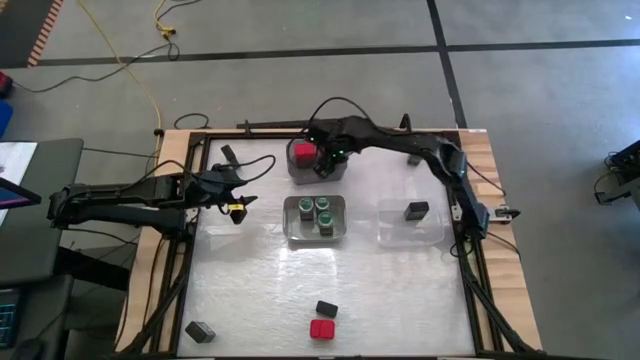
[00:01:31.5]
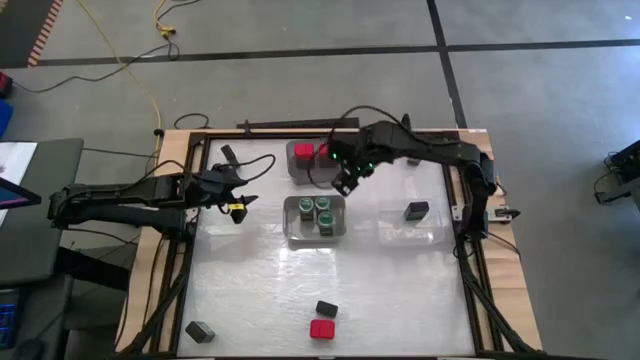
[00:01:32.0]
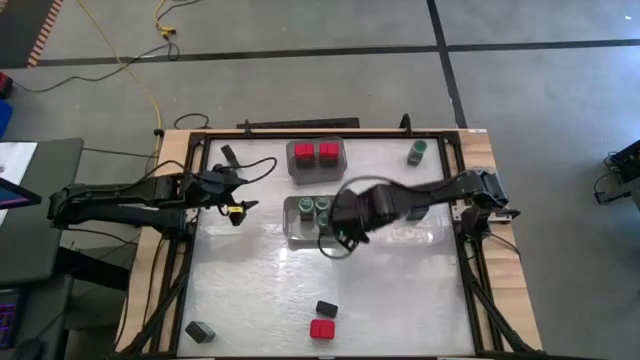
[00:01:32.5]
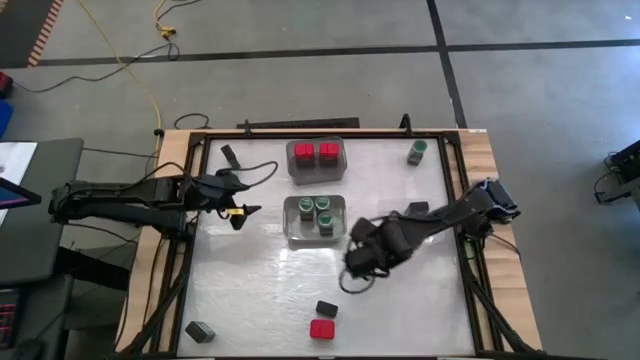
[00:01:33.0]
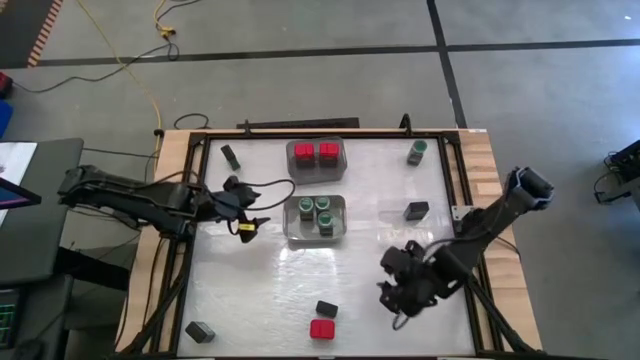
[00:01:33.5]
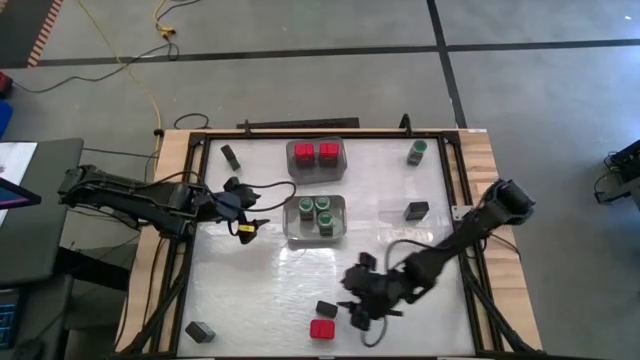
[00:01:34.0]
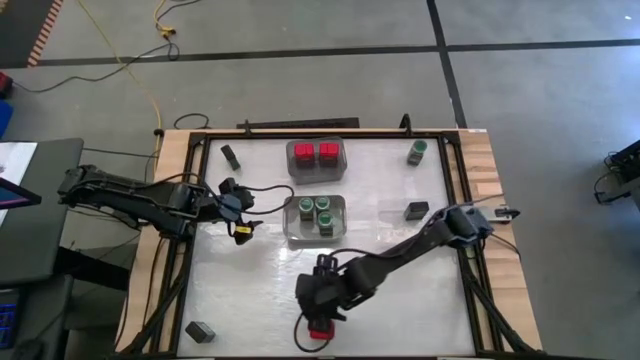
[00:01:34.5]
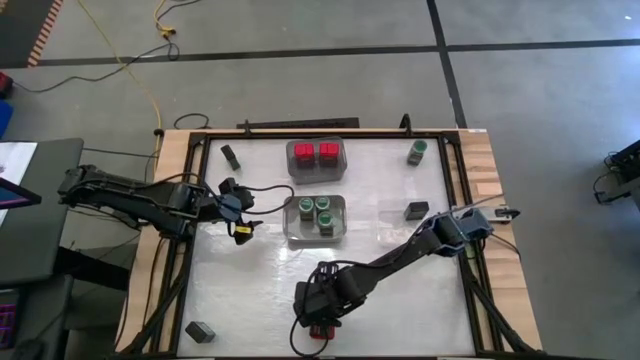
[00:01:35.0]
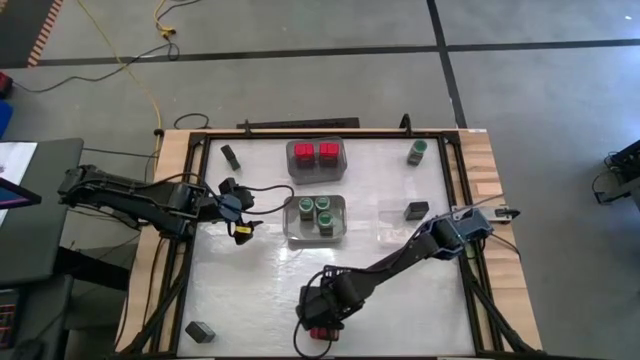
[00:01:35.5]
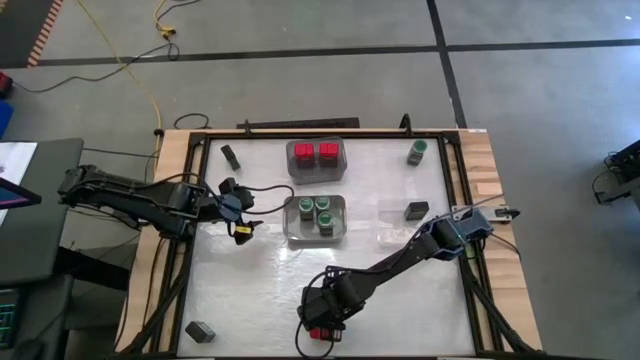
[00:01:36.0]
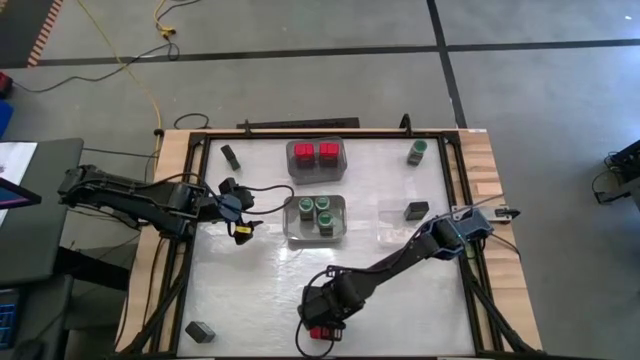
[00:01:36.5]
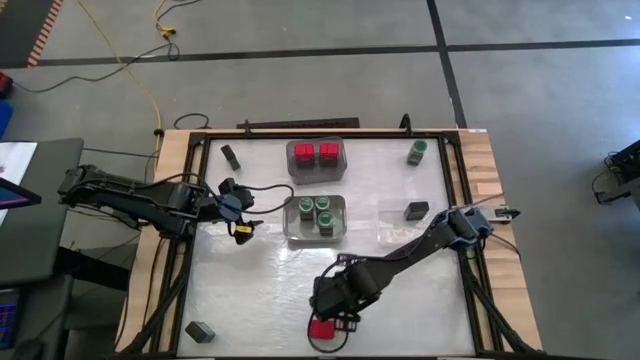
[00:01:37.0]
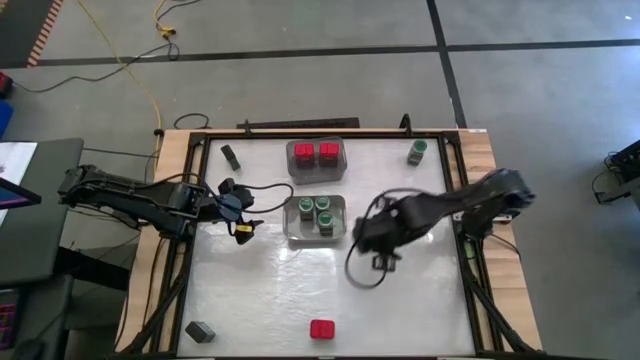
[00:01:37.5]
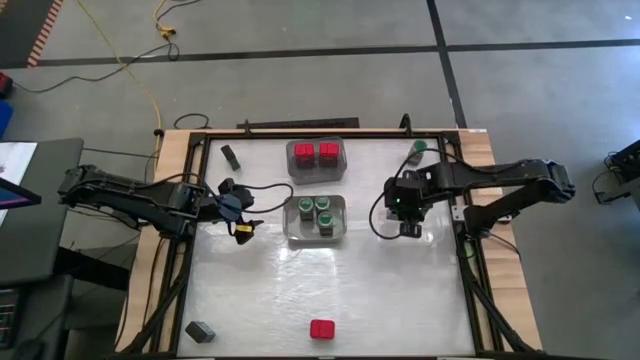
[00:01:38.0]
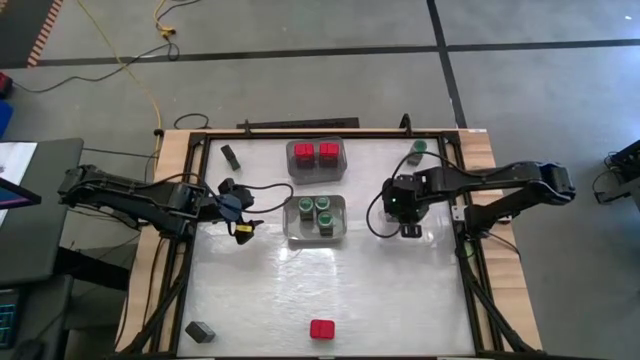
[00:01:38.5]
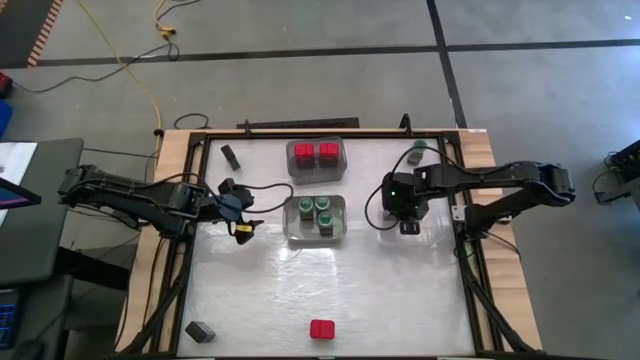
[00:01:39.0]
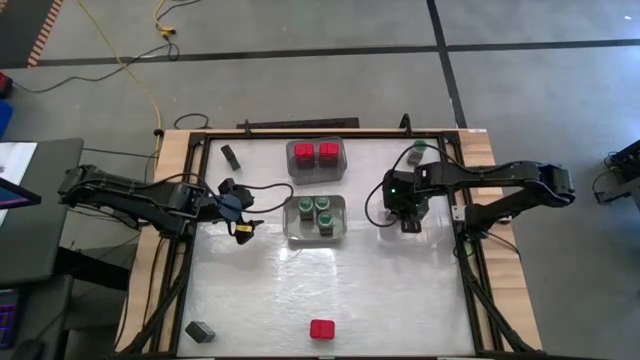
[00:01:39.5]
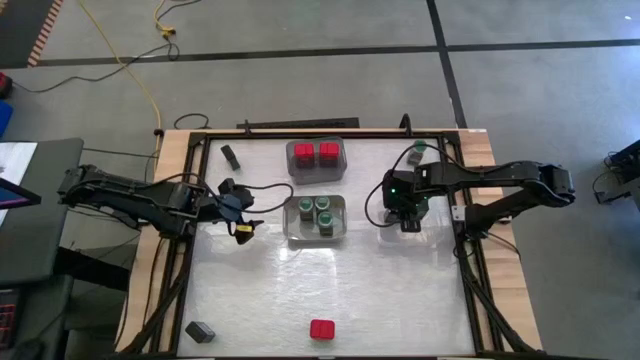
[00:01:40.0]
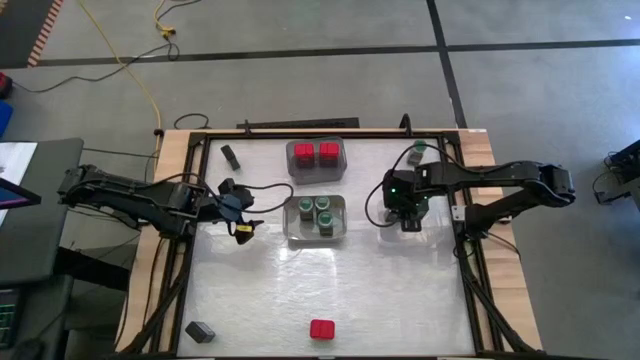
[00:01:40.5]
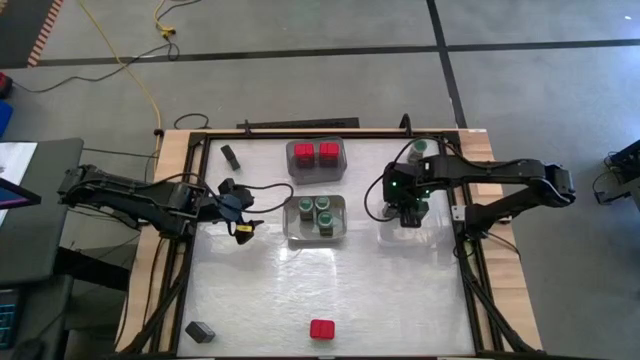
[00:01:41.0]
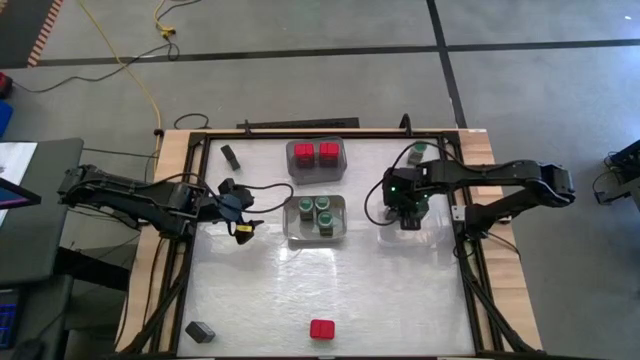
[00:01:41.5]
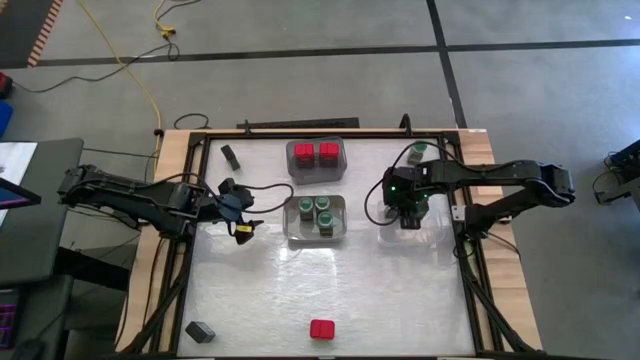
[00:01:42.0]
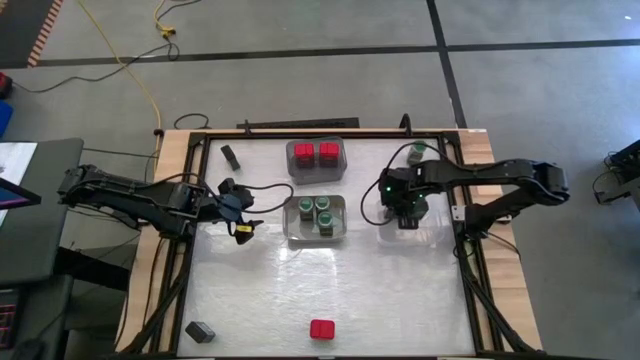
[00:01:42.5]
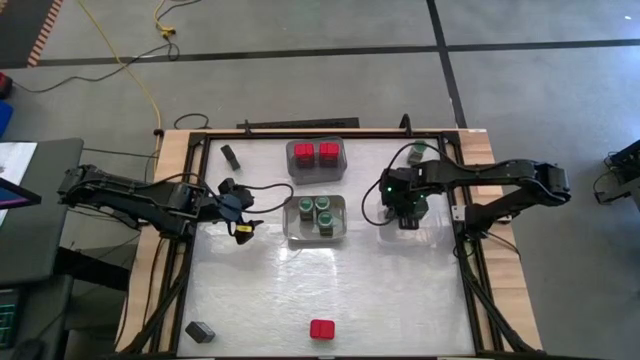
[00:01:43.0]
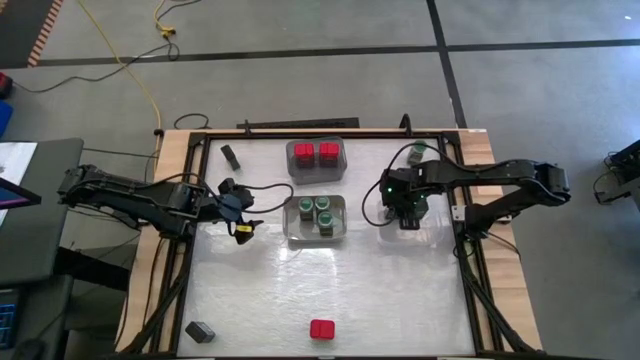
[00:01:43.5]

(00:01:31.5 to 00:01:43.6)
Task: Sort spices by type
Put the black spice can into the transparent bin

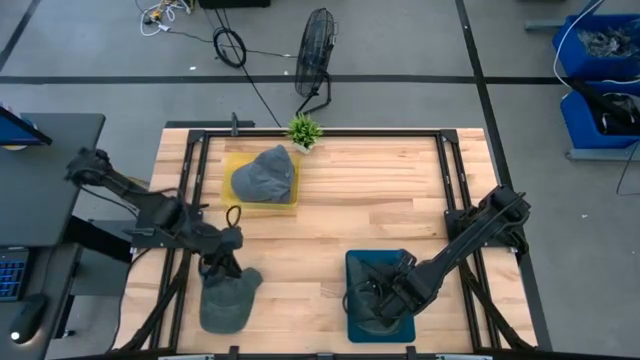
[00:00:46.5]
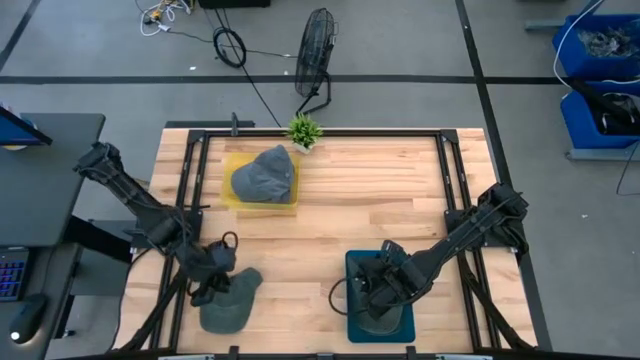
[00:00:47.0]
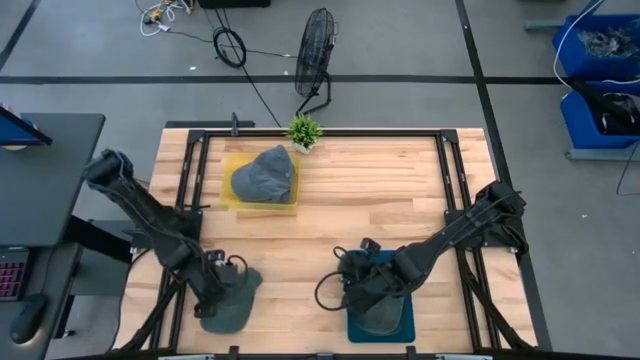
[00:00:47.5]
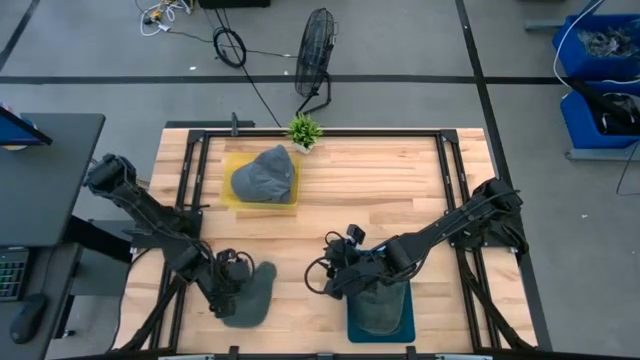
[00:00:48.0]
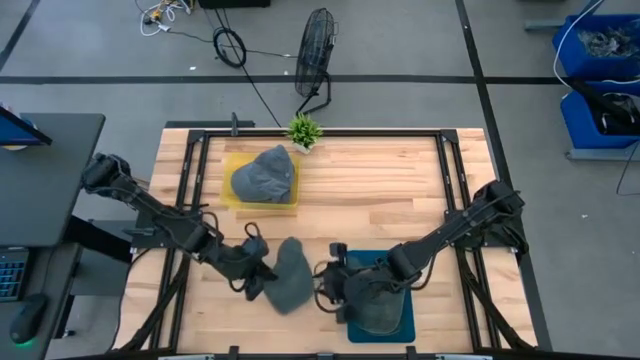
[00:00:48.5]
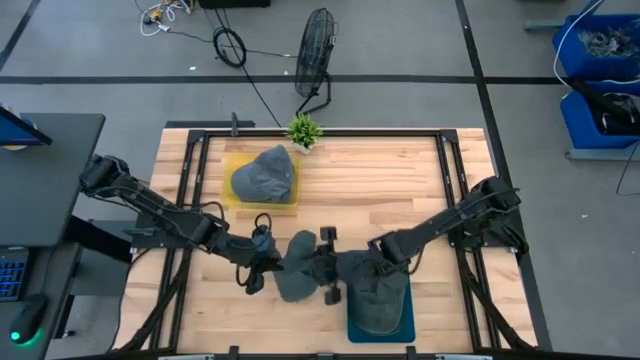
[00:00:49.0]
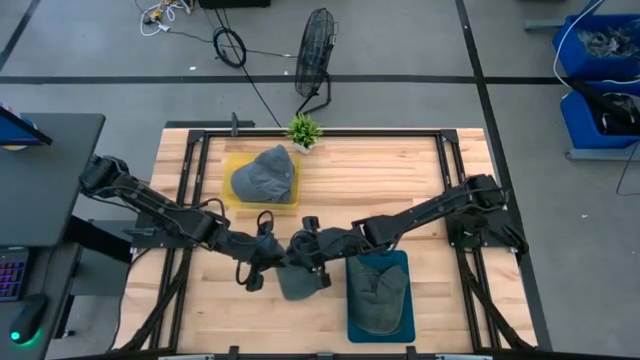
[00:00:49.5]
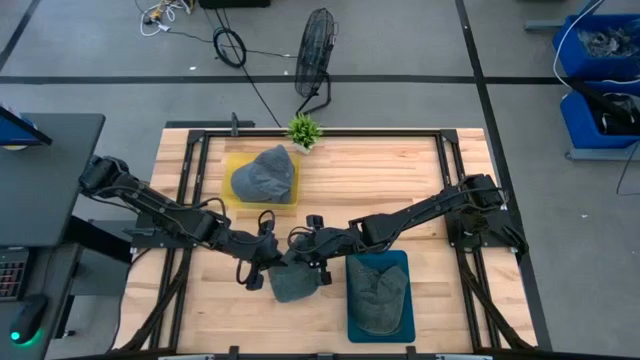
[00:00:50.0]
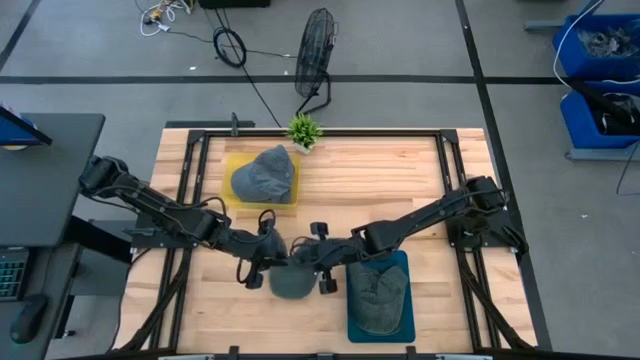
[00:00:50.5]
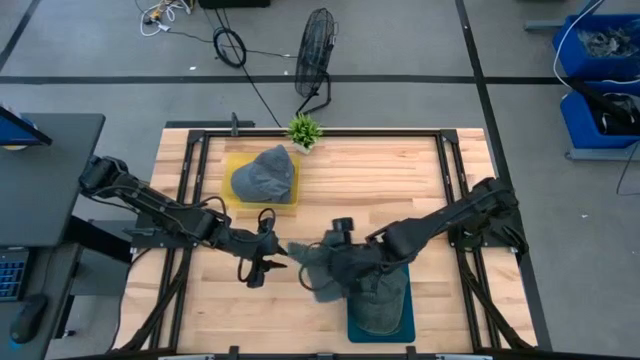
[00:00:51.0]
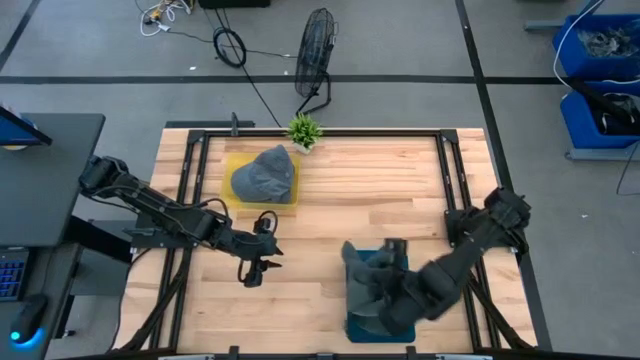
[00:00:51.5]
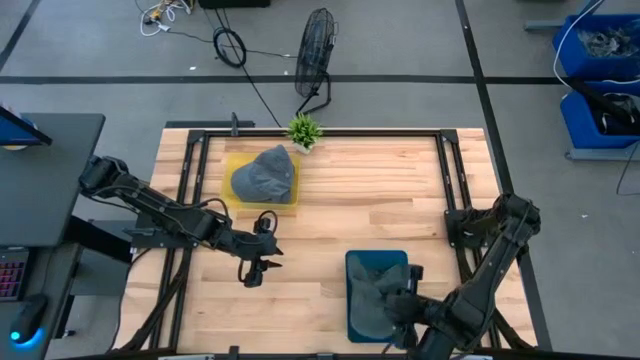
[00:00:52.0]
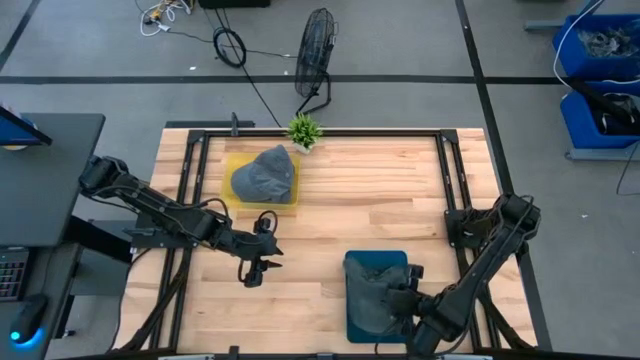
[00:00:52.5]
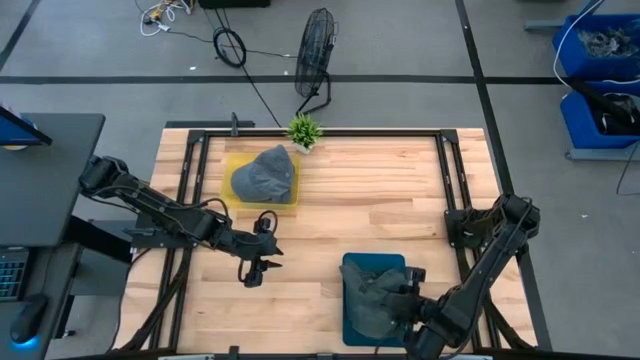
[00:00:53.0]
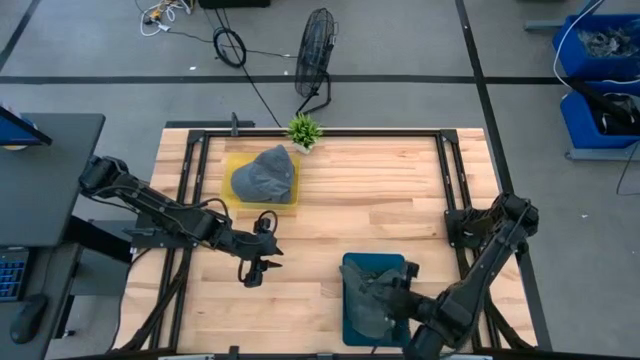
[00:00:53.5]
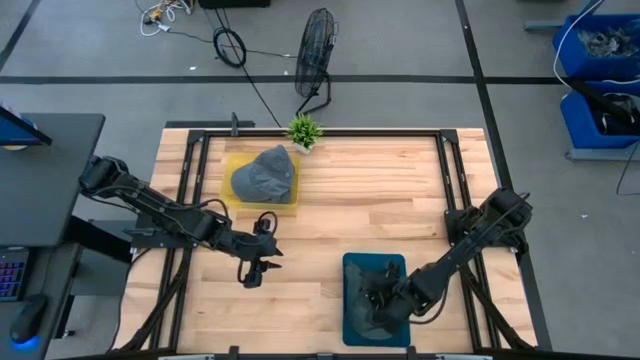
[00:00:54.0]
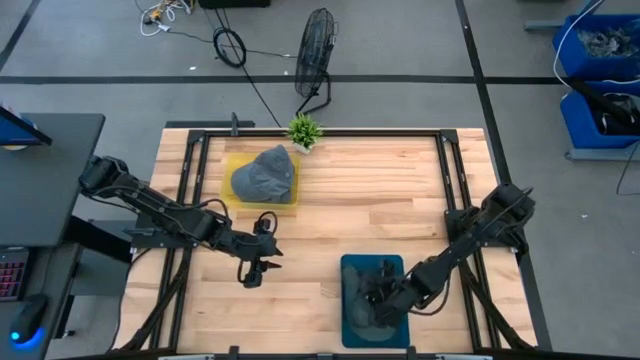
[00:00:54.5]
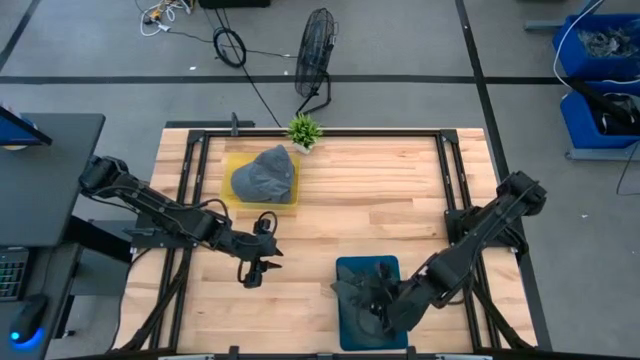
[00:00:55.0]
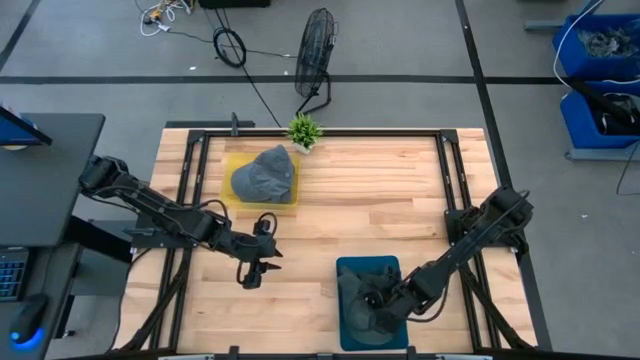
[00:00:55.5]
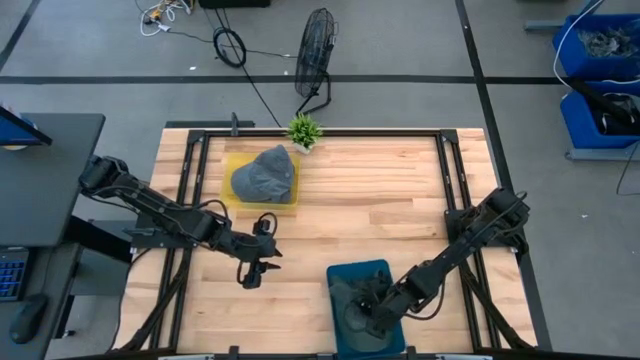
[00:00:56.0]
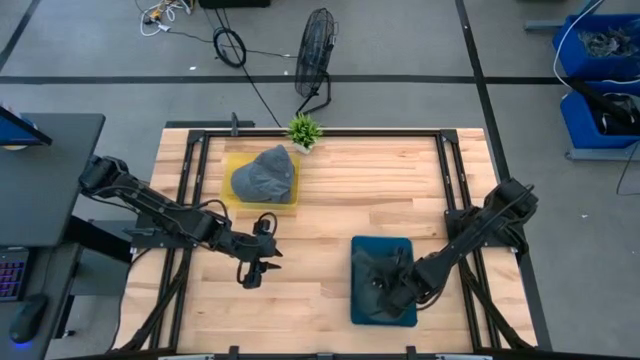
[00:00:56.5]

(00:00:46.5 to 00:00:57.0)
Task: Pick & Place hat
Put the black cap into the blue bin
